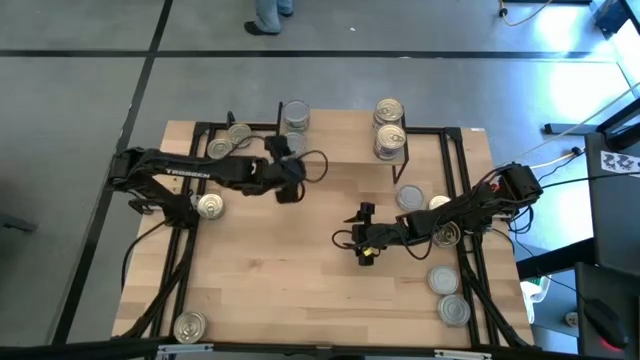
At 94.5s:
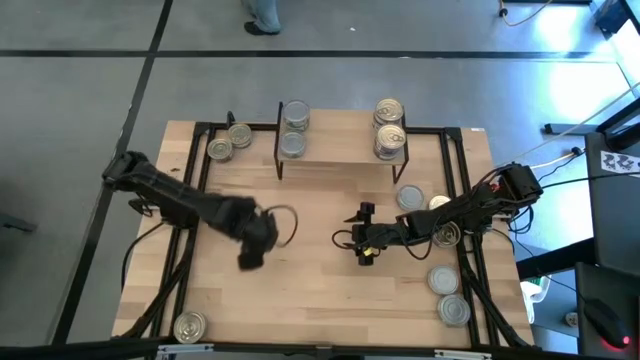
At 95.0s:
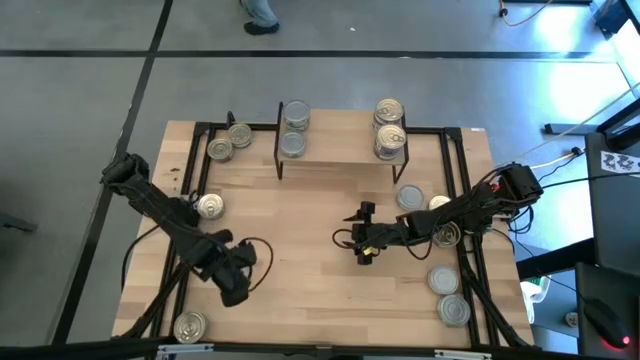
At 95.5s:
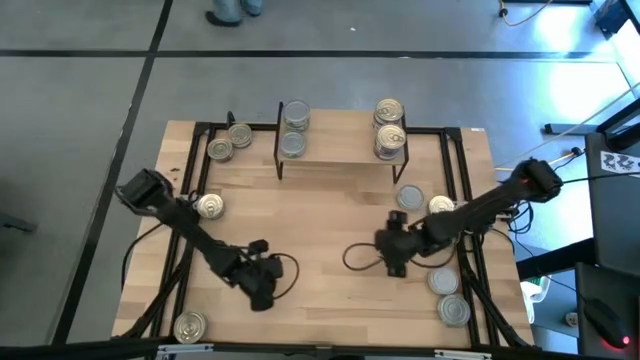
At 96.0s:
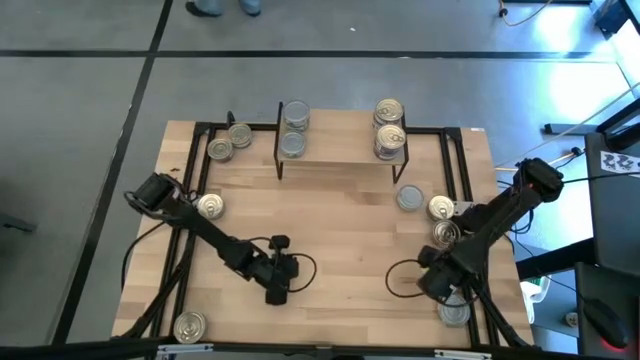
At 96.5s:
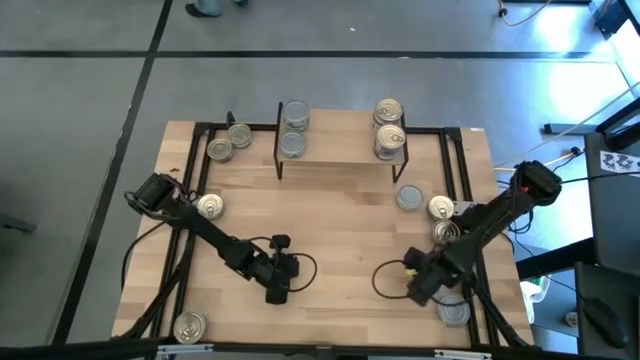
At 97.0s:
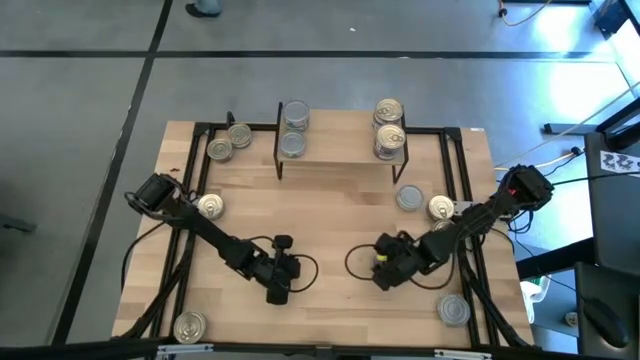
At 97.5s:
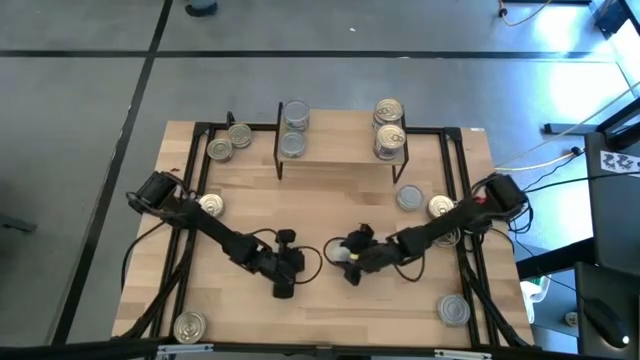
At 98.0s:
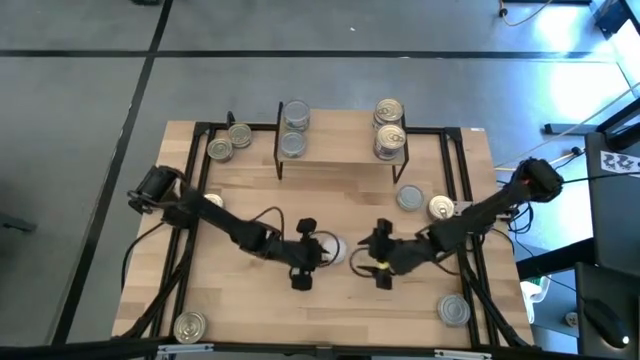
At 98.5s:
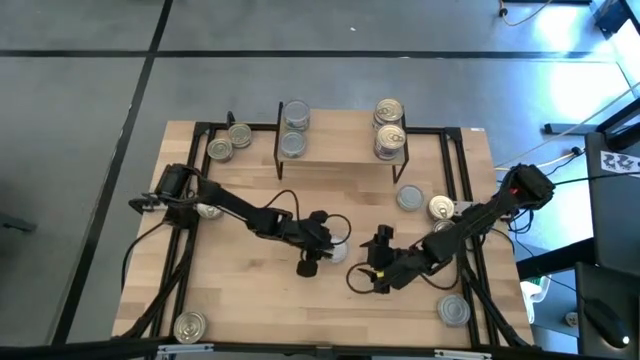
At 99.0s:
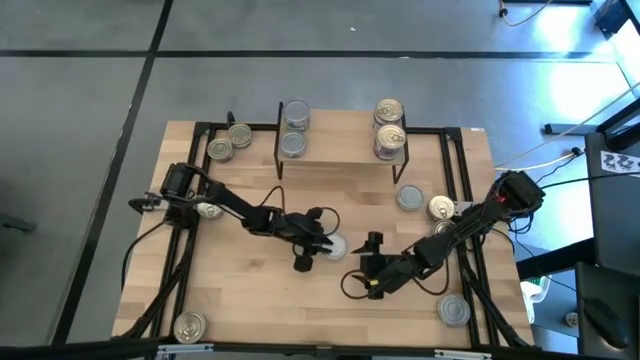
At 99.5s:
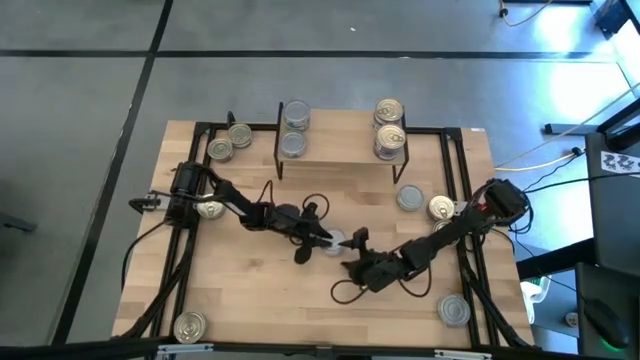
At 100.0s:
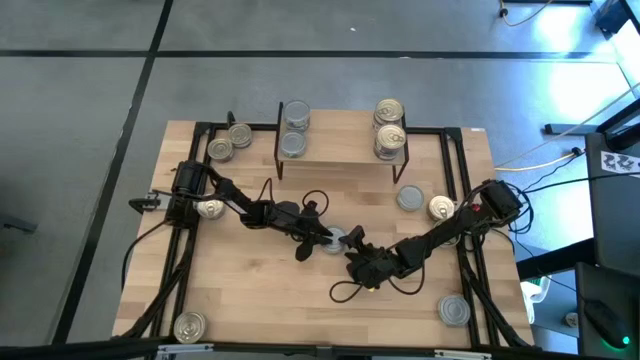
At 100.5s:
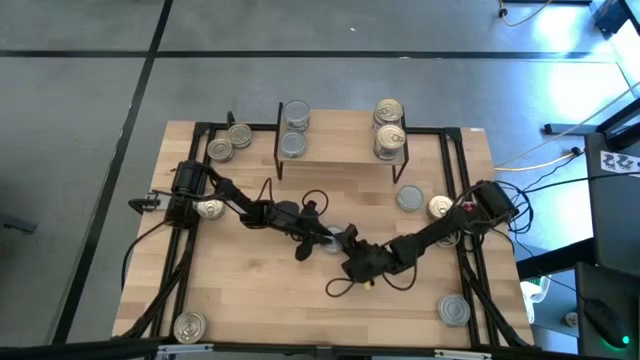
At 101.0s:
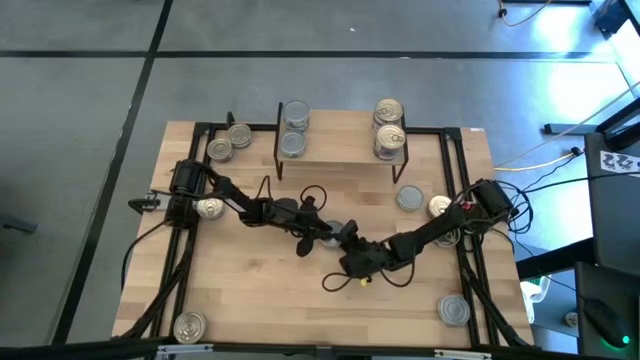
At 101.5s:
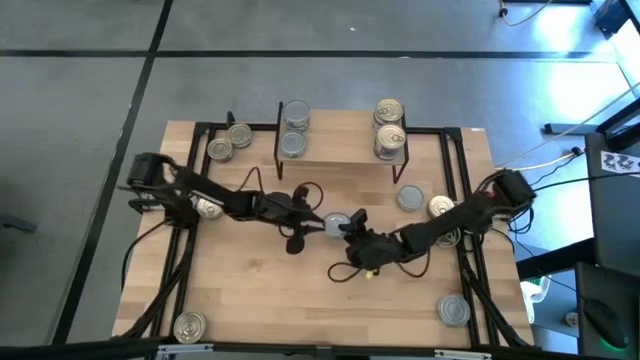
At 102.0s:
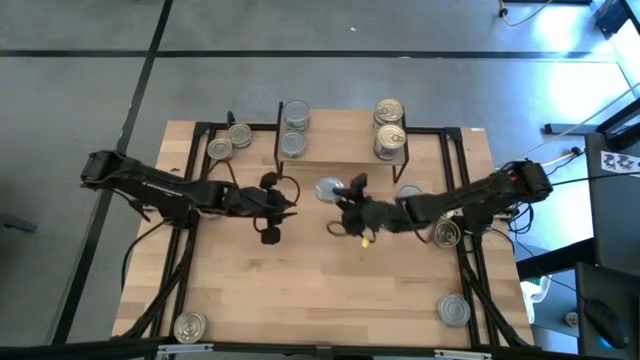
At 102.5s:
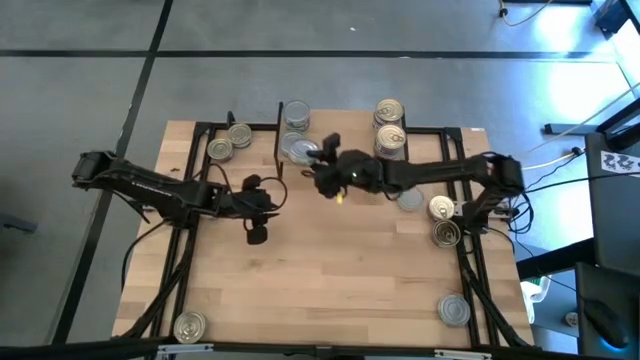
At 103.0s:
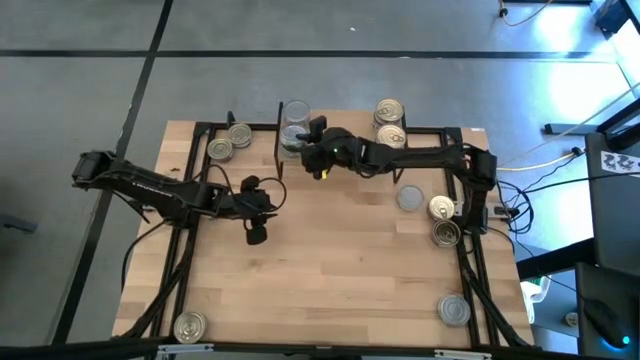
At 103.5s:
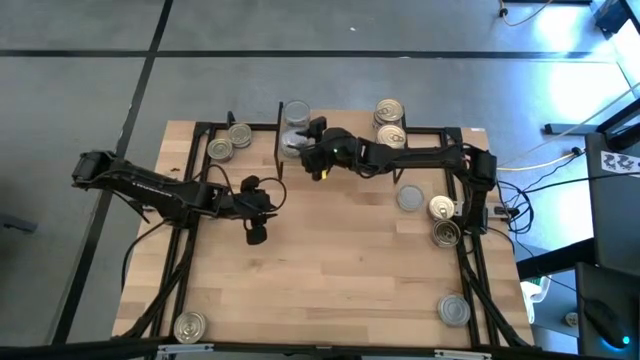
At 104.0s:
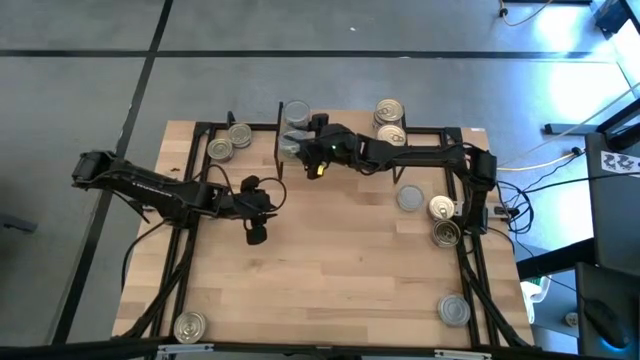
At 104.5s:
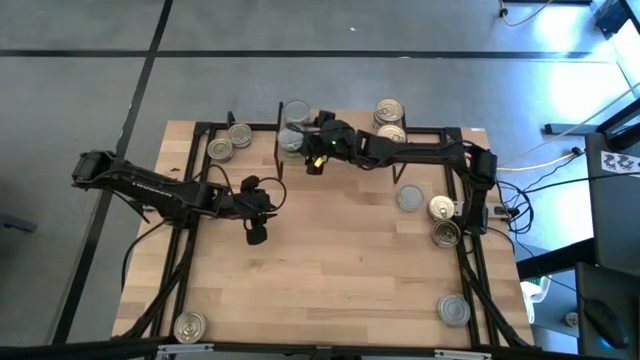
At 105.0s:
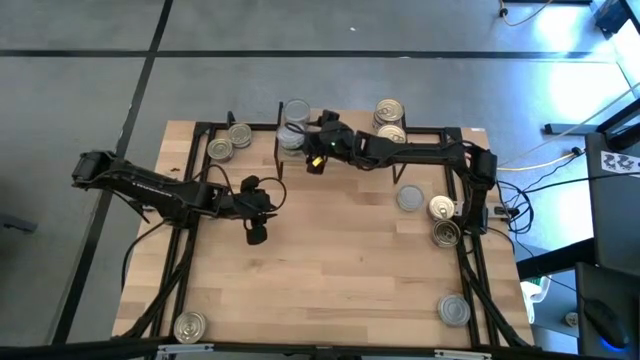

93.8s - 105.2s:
Task: Stack canned seafood by type on shelf
Stack the green white tuna can on top of the other green white tuna can on the shelf

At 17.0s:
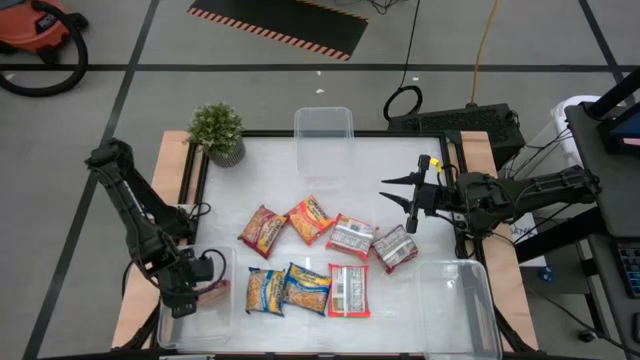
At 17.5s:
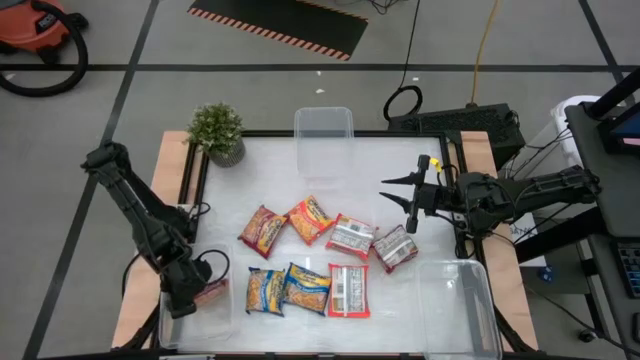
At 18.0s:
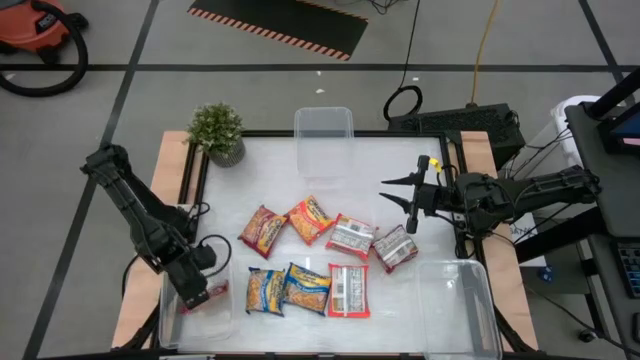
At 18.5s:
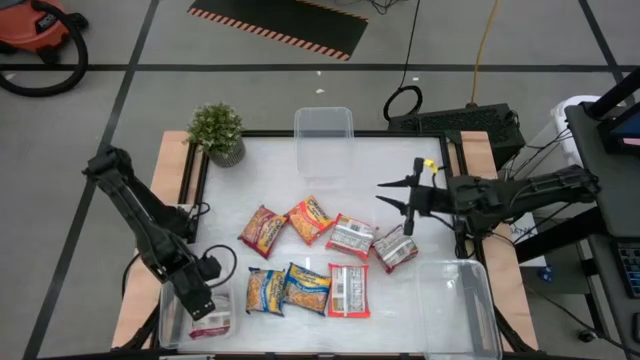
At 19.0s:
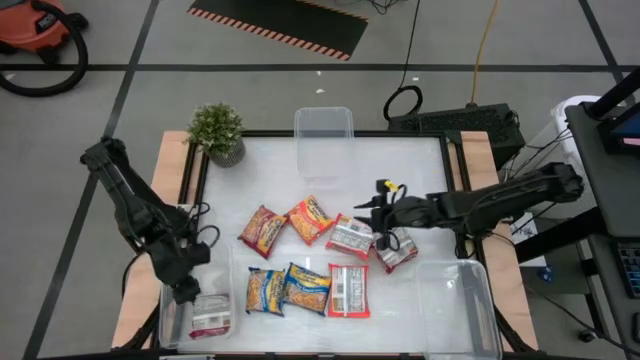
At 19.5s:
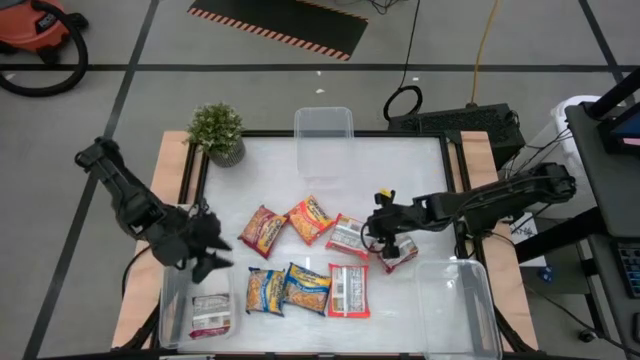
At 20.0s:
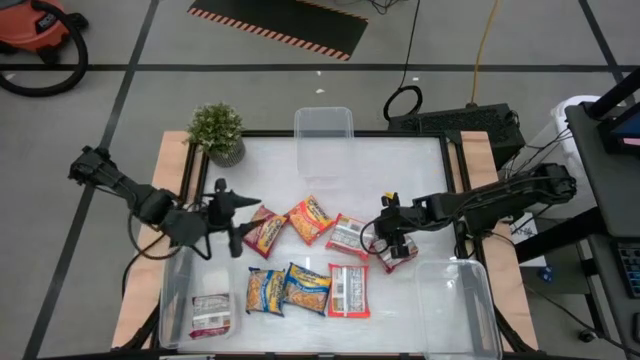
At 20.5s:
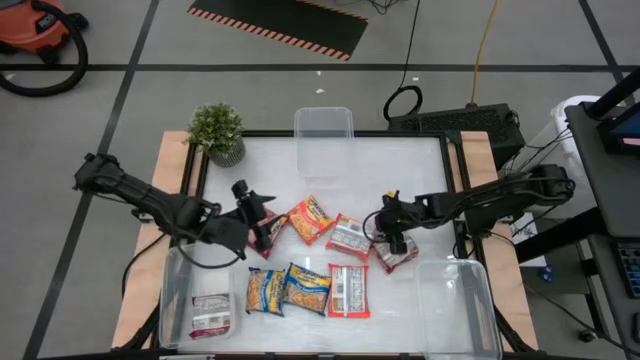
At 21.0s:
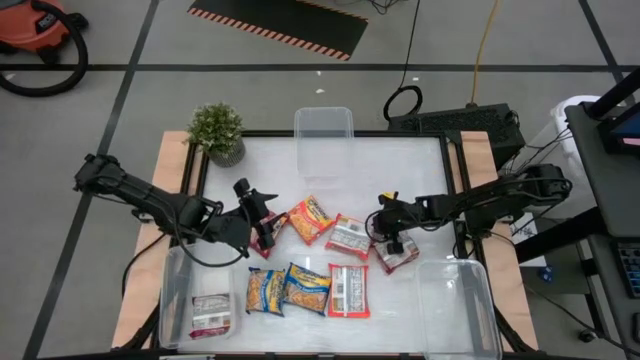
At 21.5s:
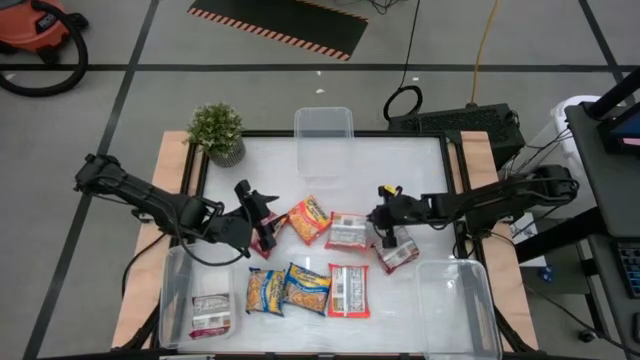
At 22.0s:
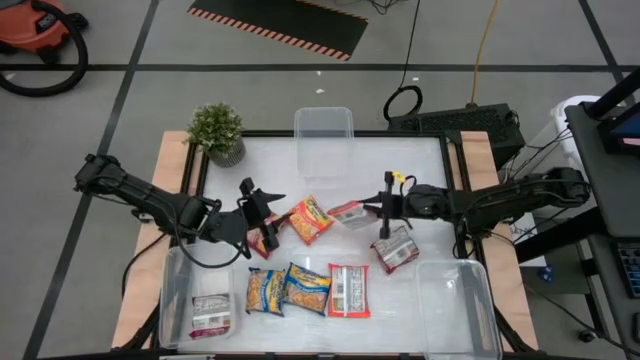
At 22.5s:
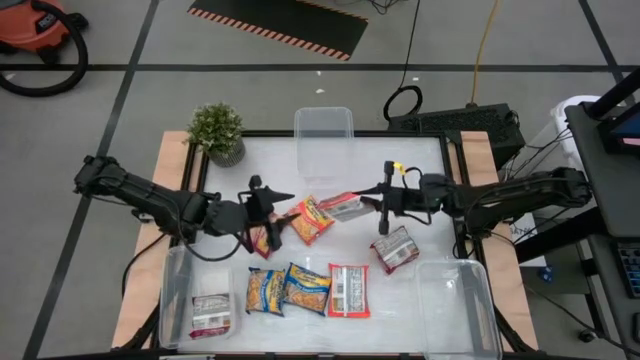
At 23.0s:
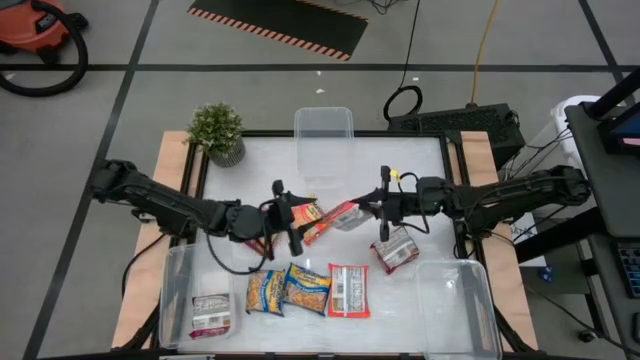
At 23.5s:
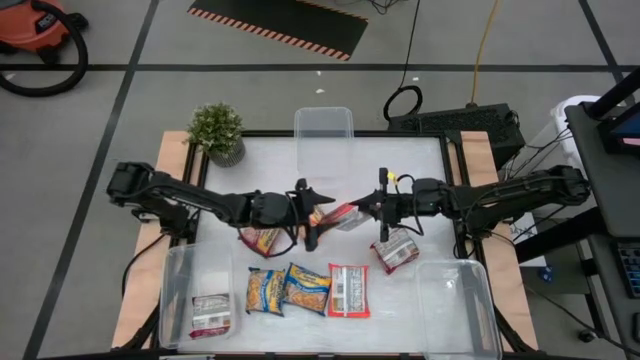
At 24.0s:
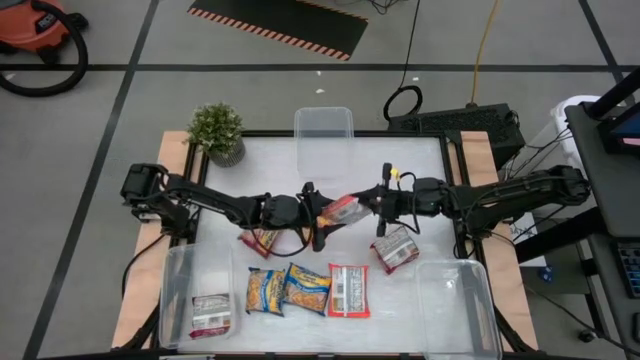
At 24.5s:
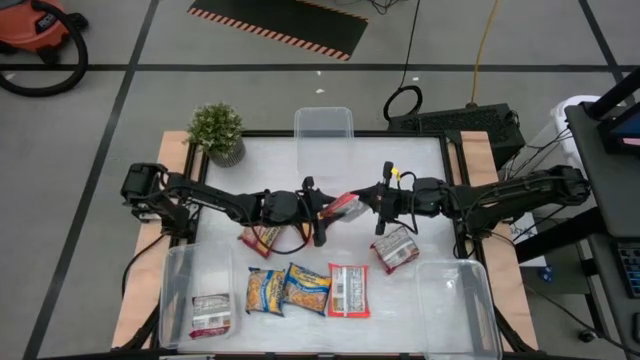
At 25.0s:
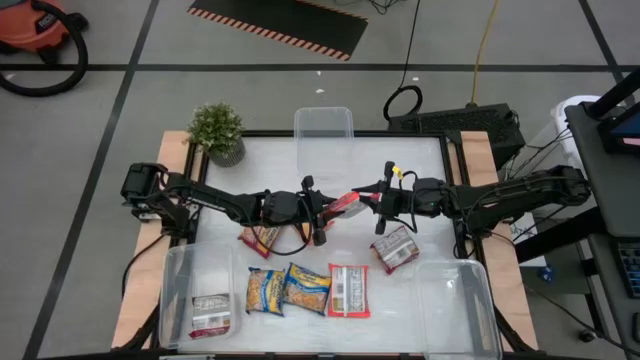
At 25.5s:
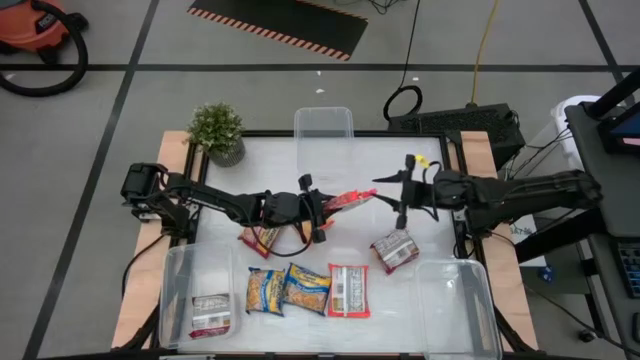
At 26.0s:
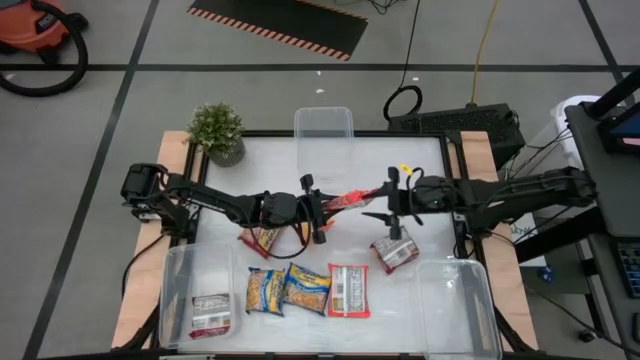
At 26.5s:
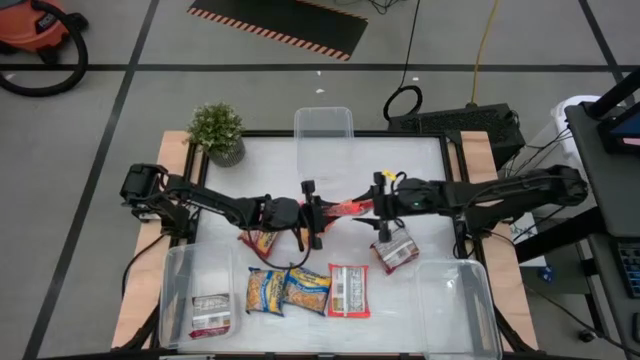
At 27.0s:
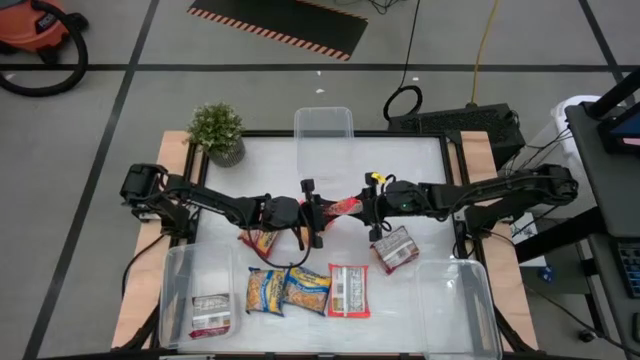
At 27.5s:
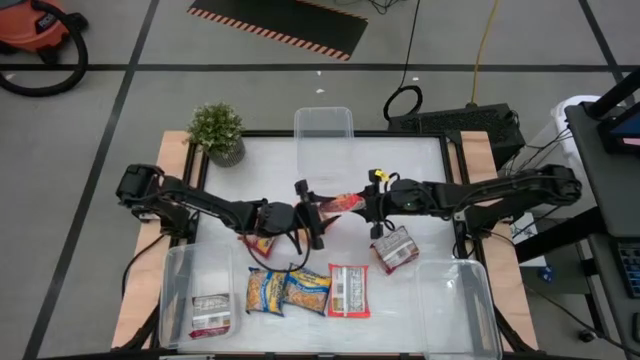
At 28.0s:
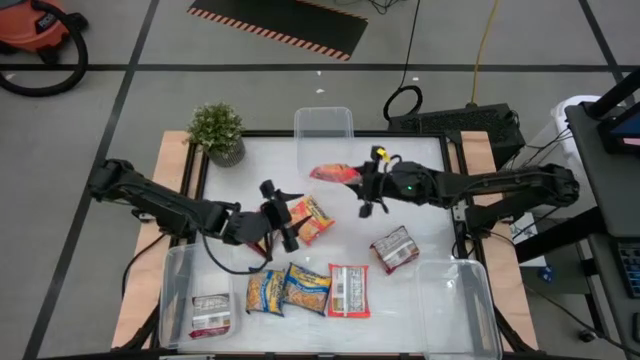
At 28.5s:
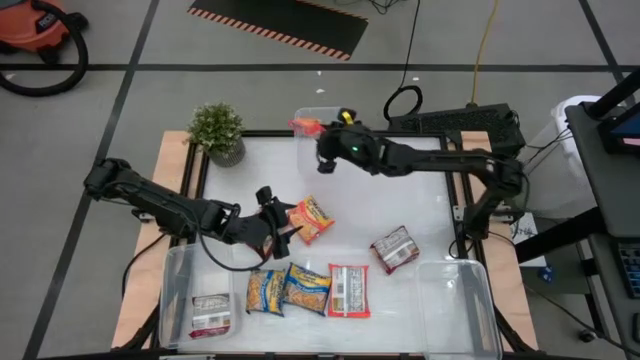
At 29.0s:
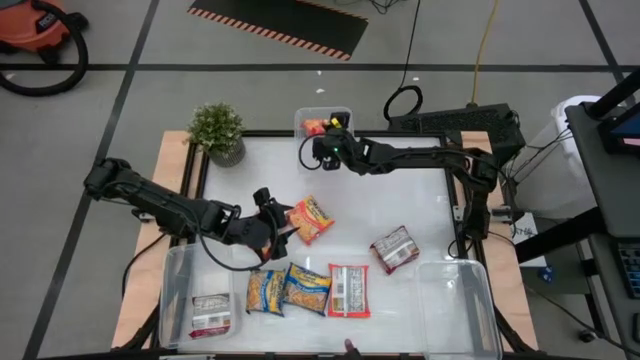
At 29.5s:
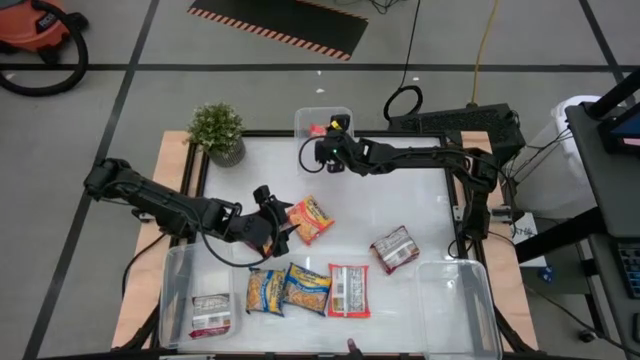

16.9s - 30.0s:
Task: Sort Maruchan noodles
Put the top right orange noodle pack into the top transparent bin
